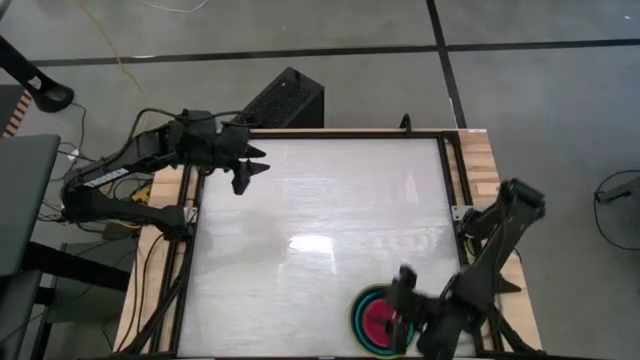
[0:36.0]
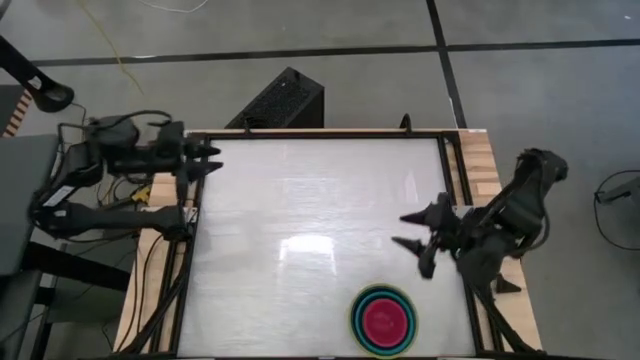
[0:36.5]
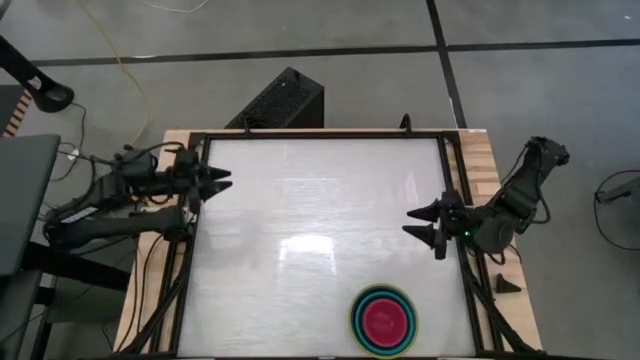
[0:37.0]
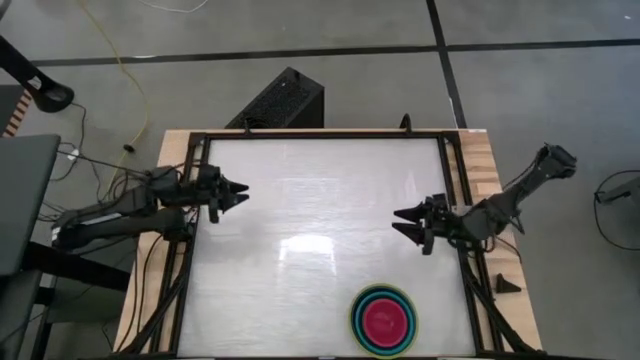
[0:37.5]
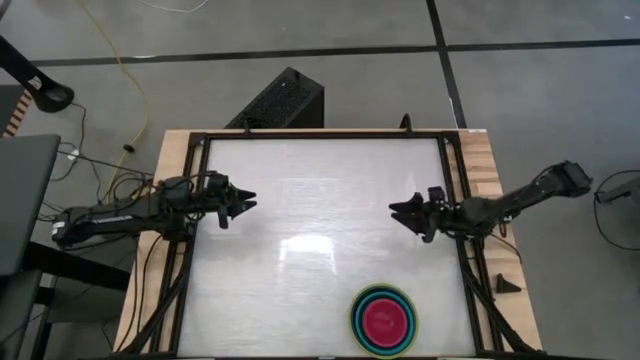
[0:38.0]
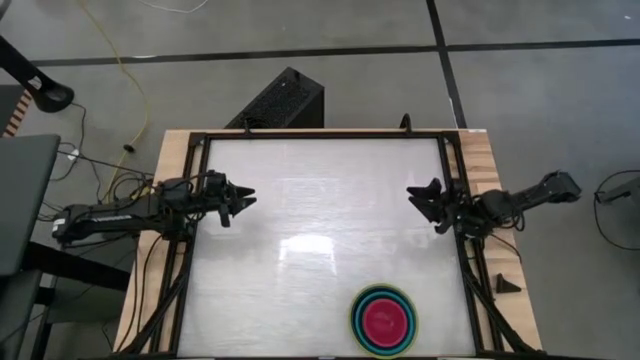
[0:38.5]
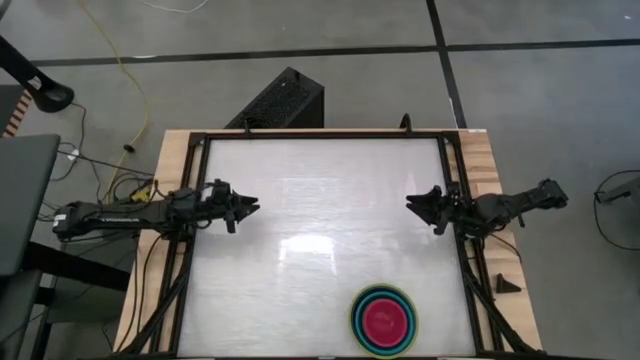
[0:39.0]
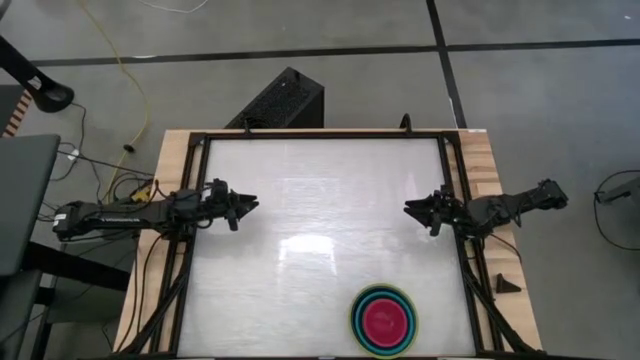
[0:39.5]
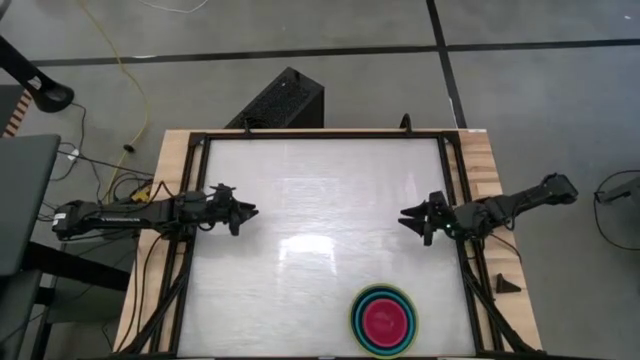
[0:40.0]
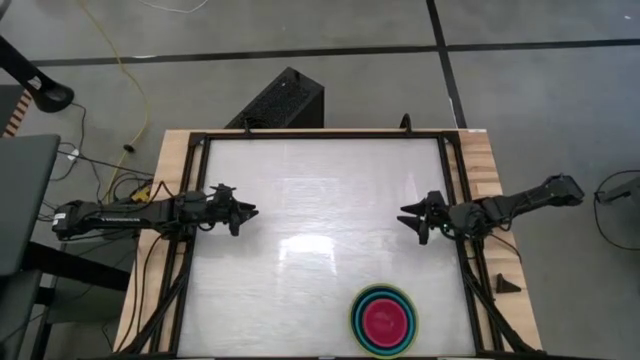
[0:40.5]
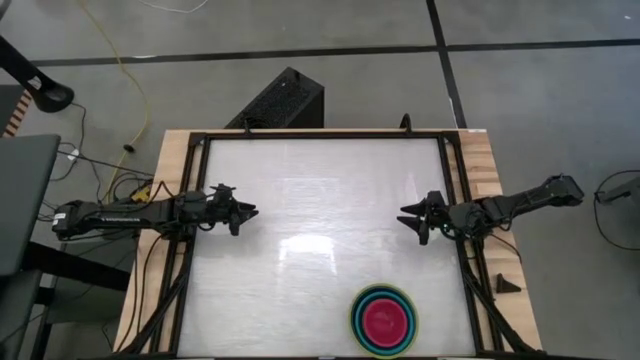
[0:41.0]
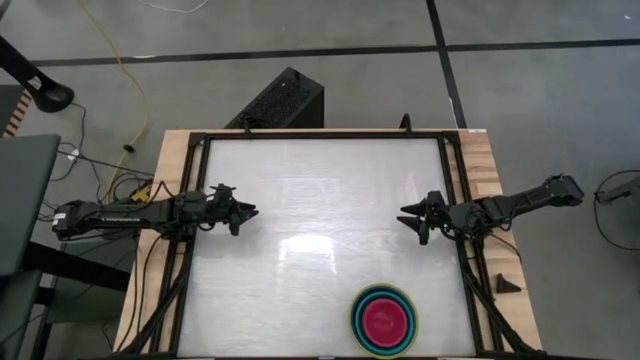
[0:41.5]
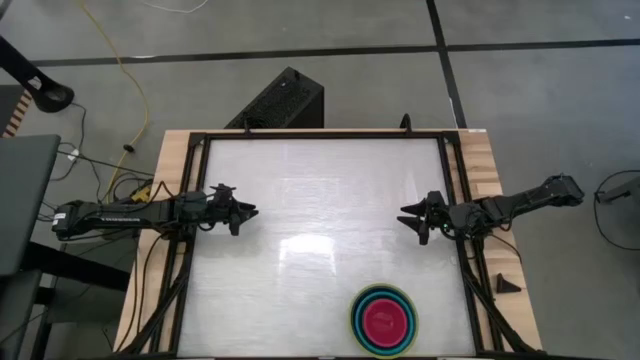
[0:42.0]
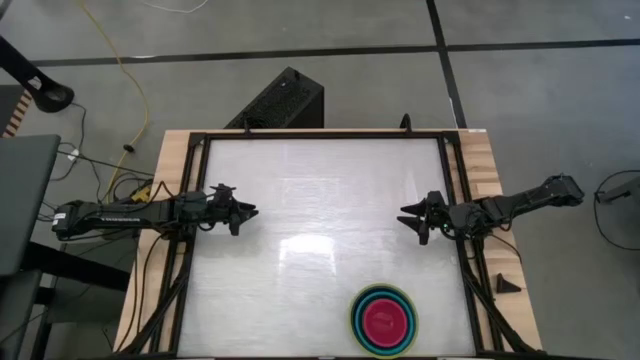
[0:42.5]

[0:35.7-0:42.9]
Task: Nest bowls inside each other by size order
Return to Home Position

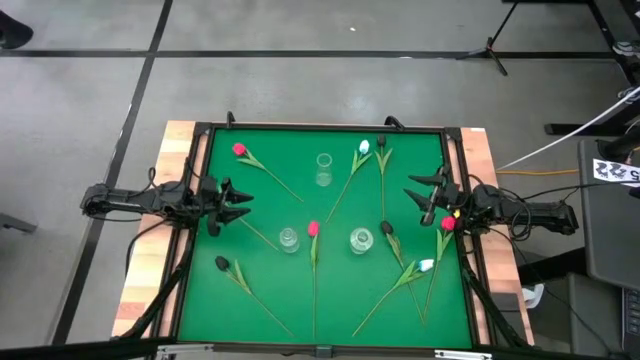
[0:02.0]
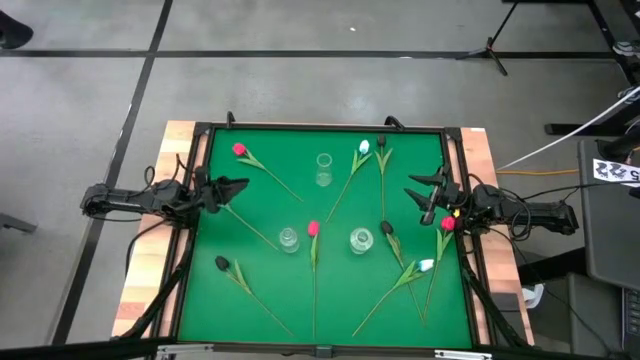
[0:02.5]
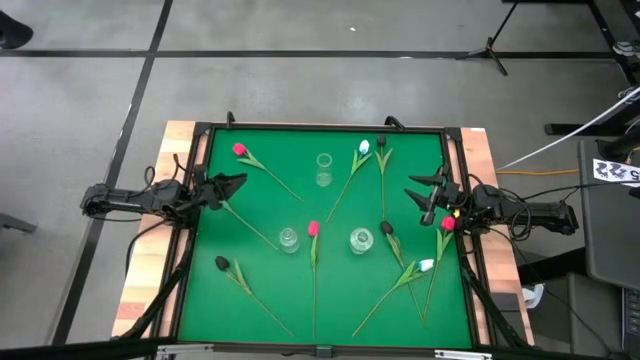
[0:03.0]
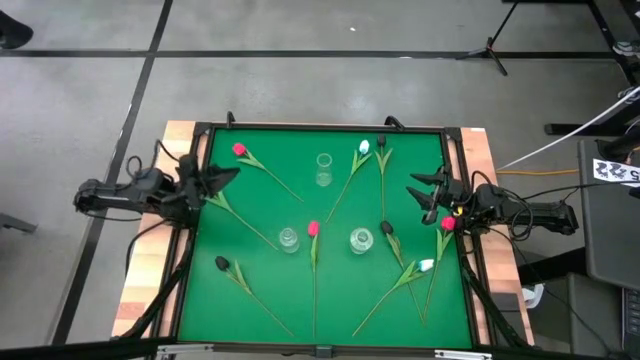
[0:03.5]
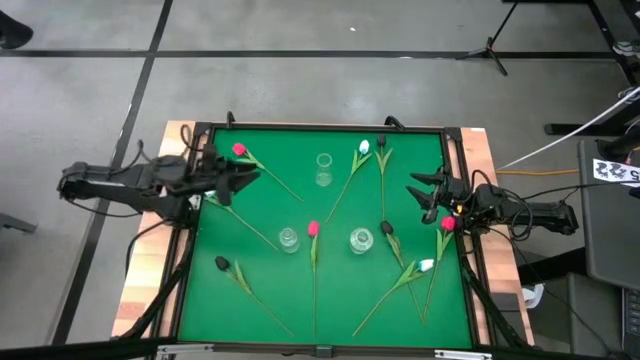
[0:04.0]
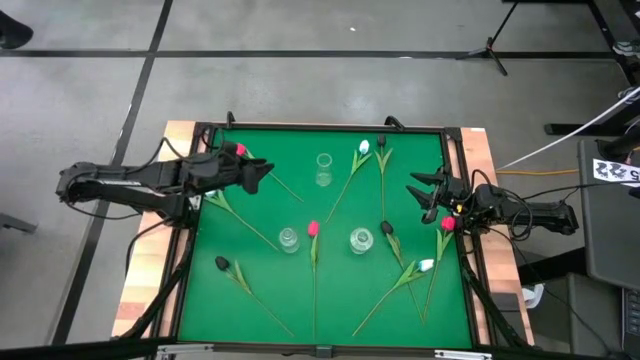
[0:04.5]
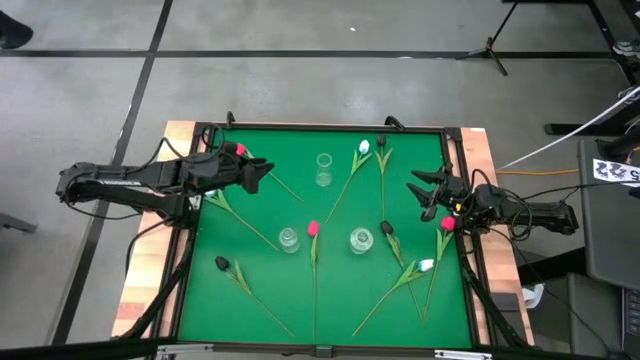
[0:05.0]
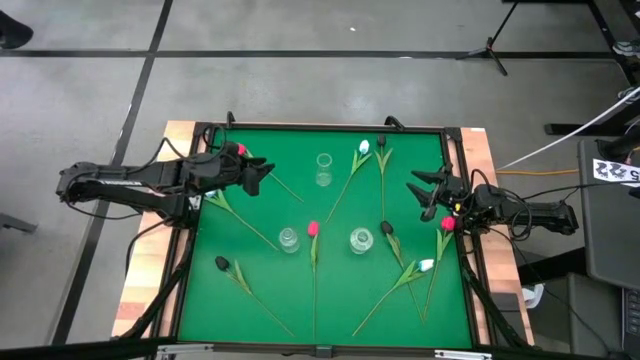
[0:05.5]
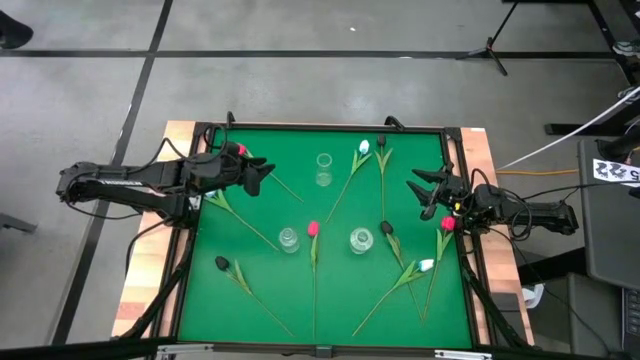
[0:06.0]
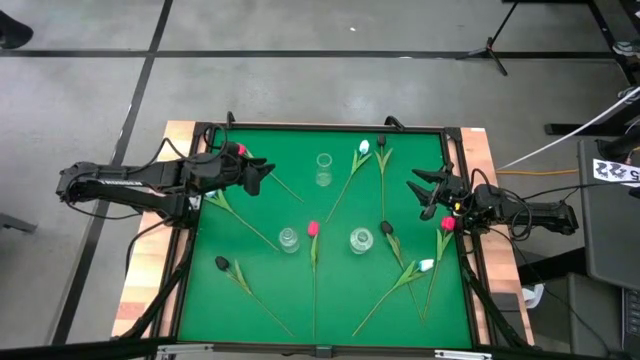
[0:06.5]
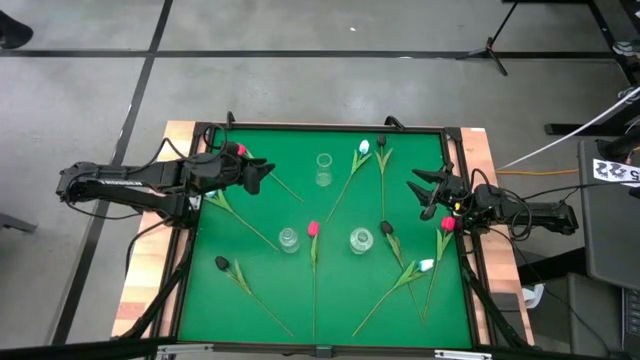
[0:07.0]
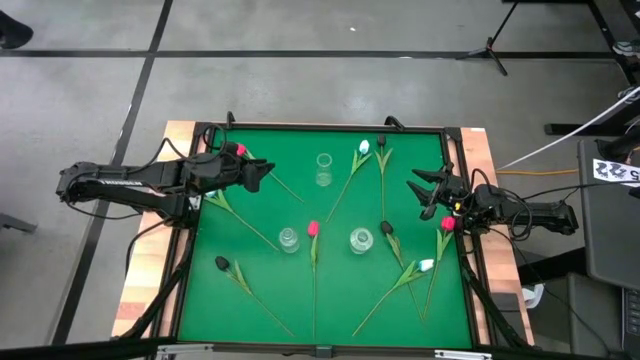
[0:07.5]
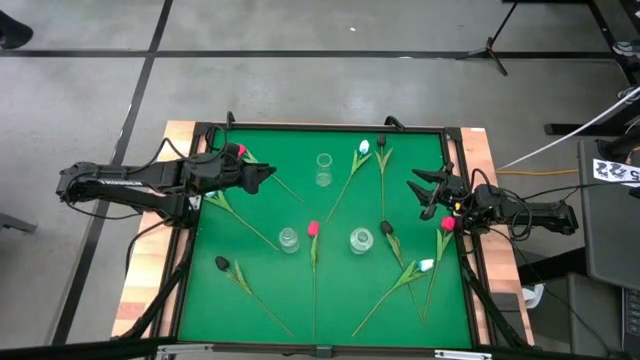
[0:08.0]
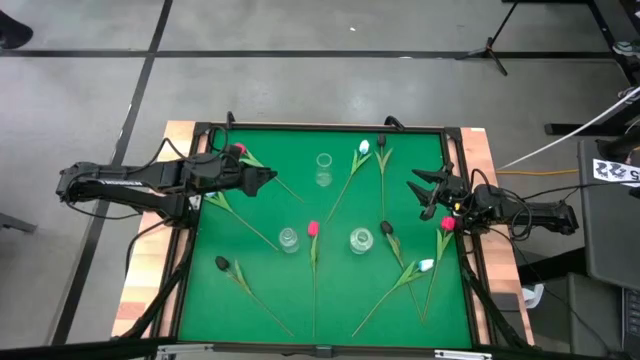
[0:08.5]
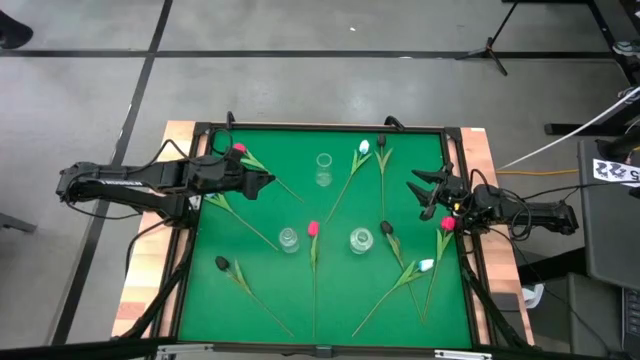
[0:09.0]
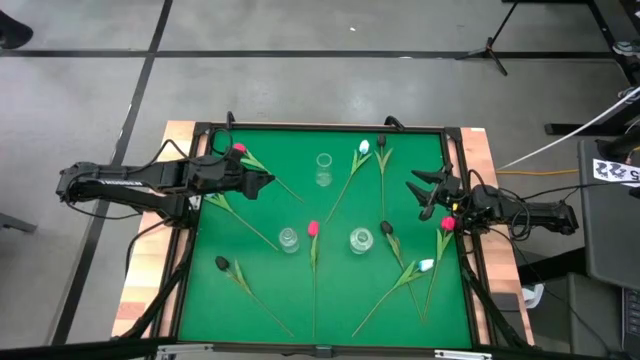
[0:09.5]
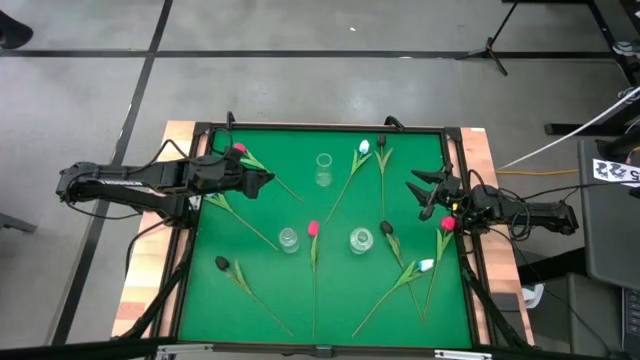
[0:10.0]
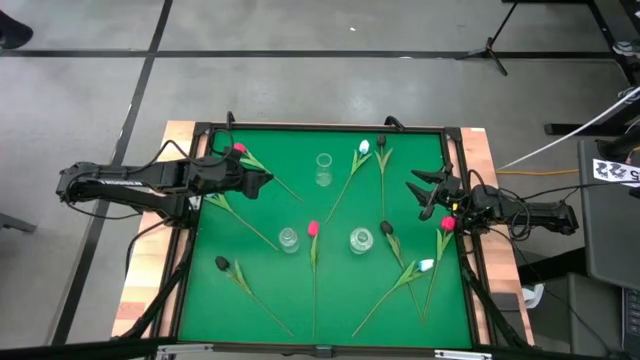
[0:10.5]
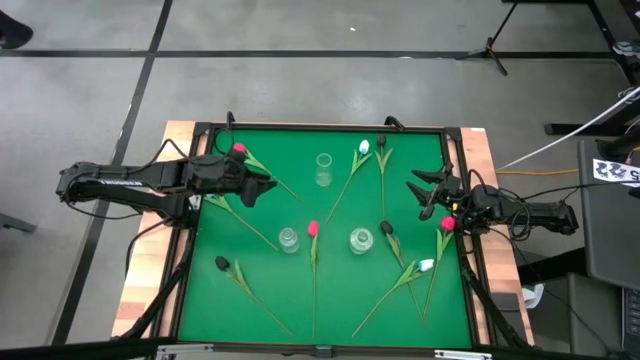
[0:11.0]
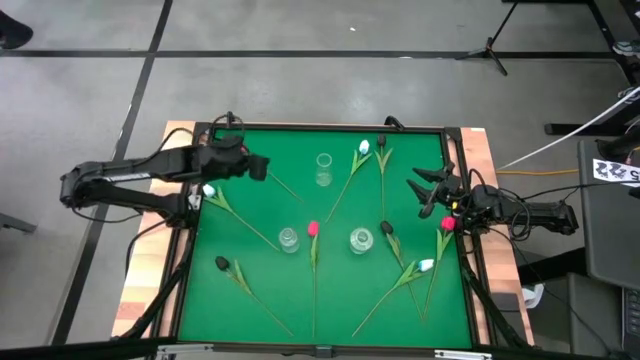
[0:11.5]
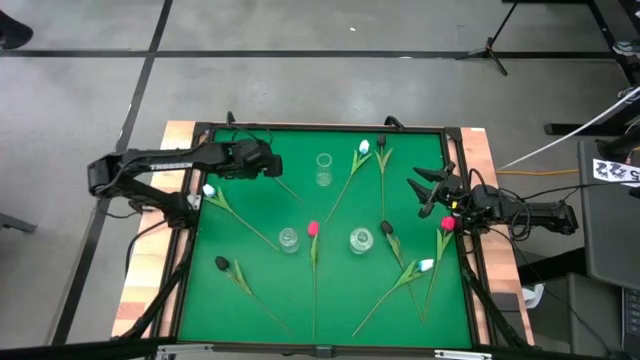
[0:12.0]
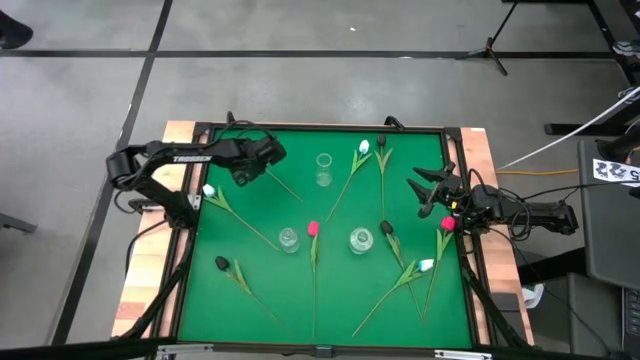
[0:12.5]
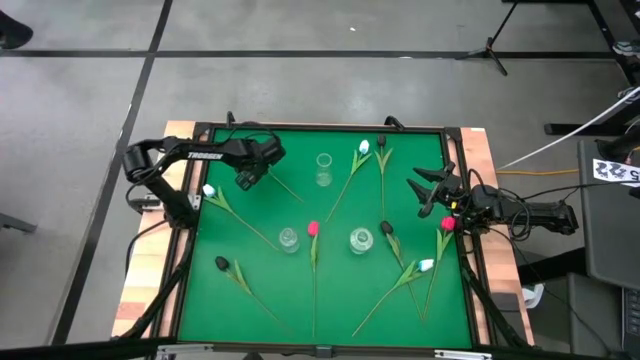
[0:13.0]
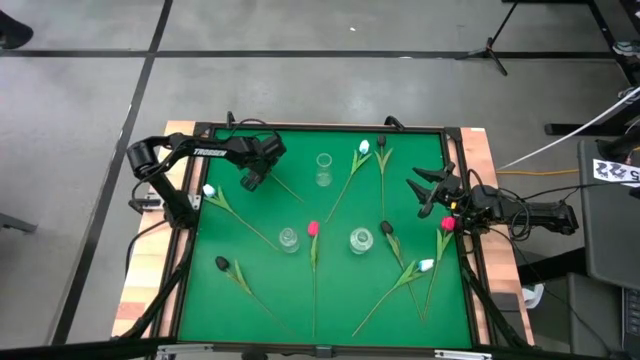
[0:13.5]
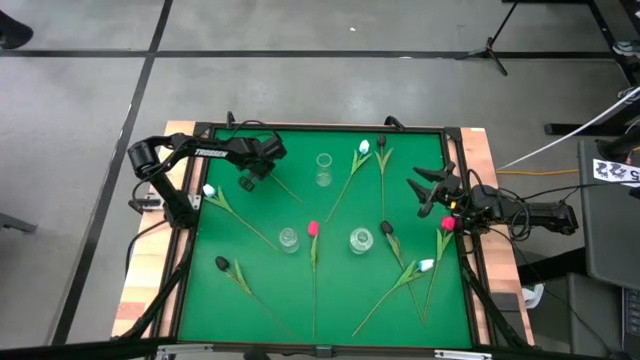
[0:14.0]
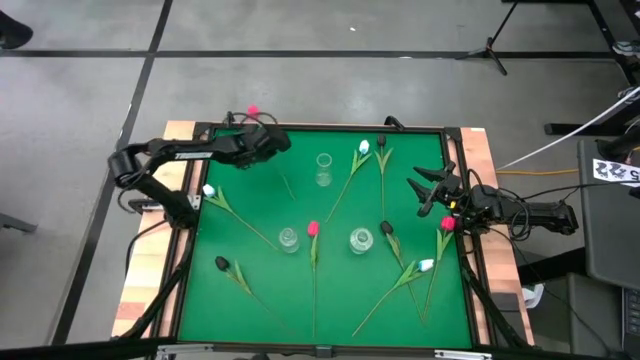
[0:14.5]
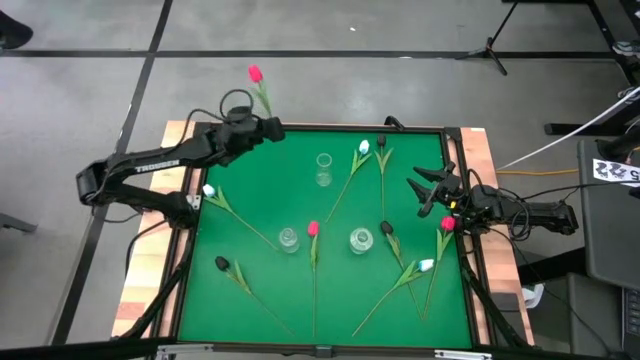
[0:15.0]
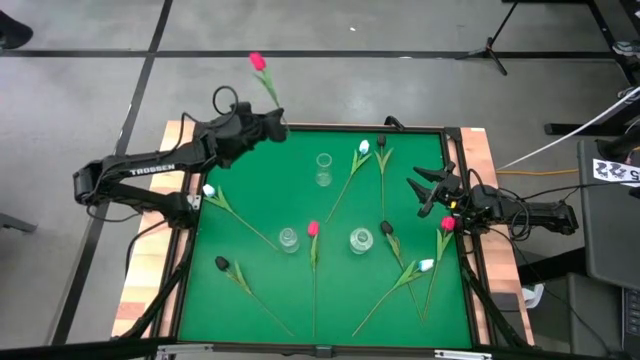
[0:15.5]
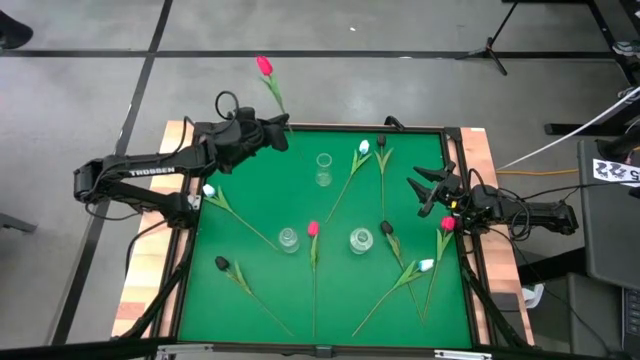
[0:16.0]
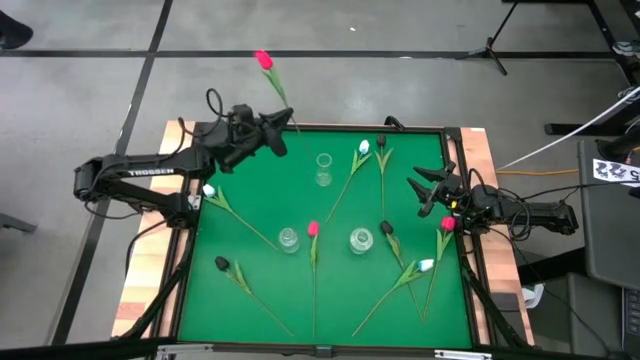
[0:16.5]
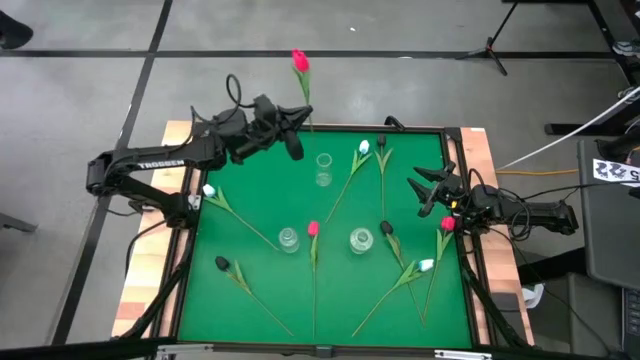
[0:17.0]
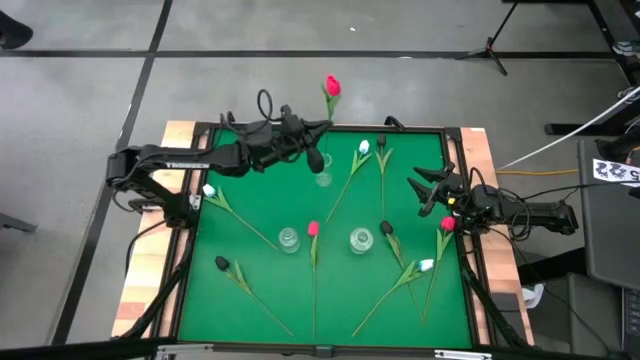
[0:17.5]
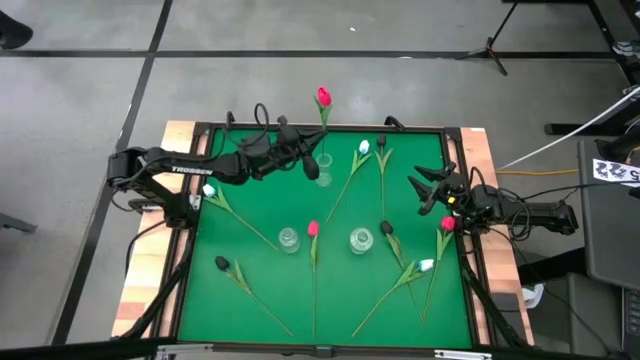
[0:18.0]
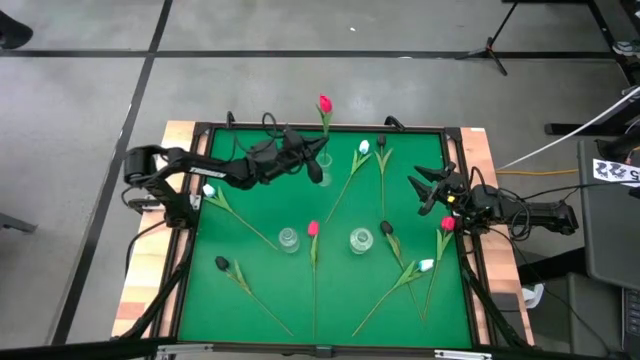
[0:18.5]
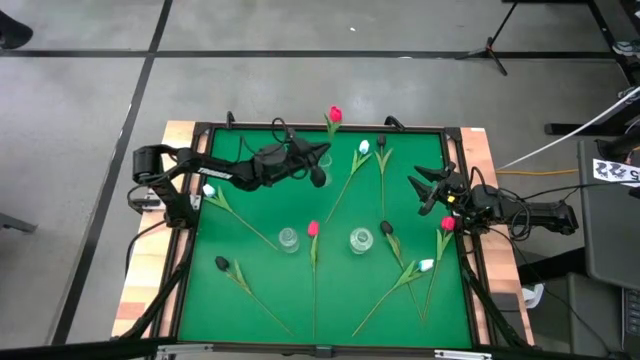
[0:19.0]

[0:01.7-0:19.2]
Task: Sort flowers into vase by color
Put the top red tulip into the top transparent vase
